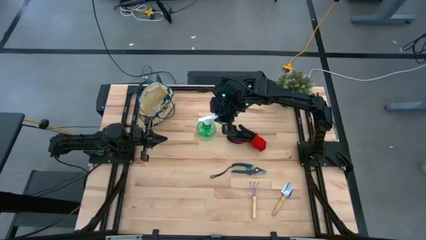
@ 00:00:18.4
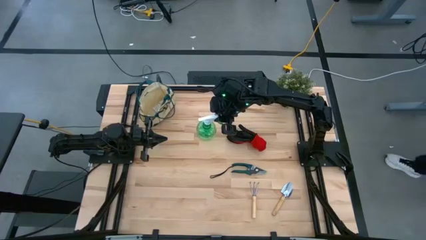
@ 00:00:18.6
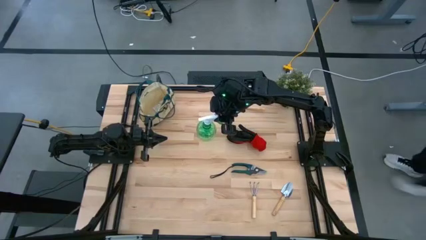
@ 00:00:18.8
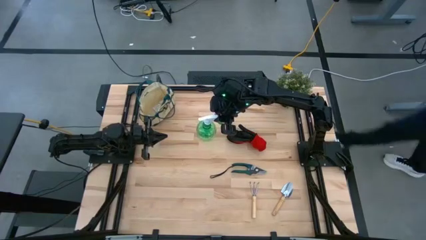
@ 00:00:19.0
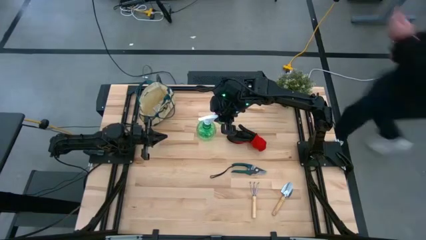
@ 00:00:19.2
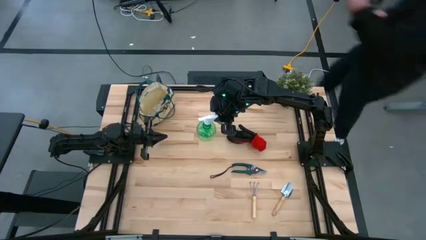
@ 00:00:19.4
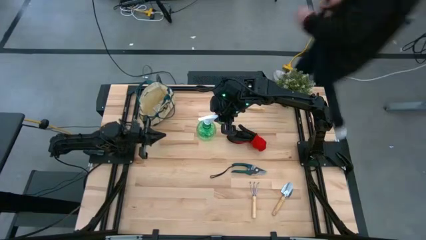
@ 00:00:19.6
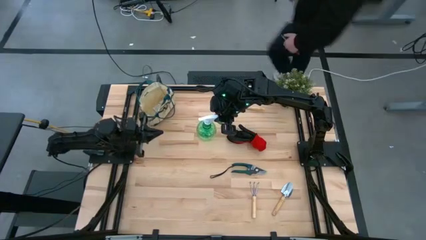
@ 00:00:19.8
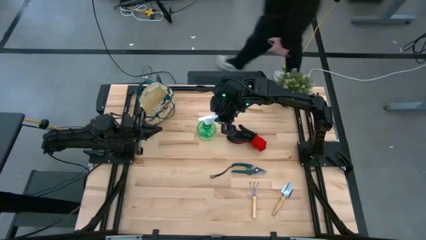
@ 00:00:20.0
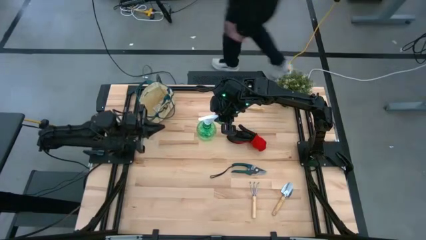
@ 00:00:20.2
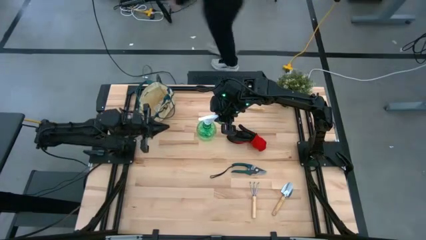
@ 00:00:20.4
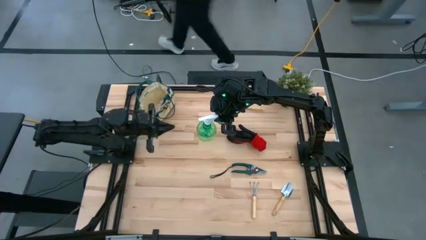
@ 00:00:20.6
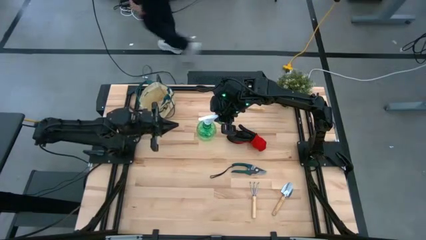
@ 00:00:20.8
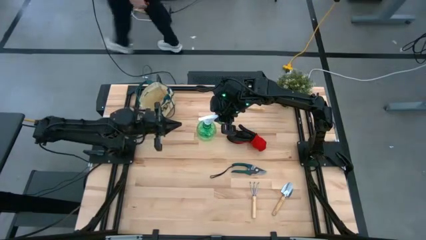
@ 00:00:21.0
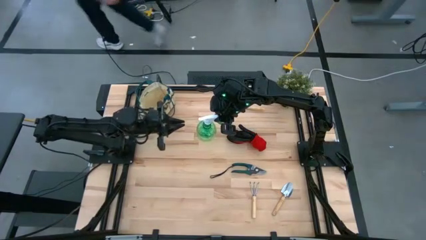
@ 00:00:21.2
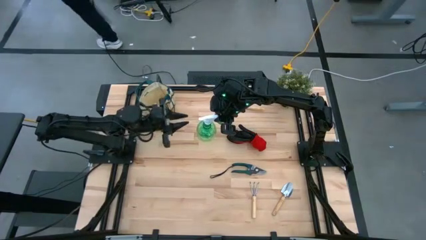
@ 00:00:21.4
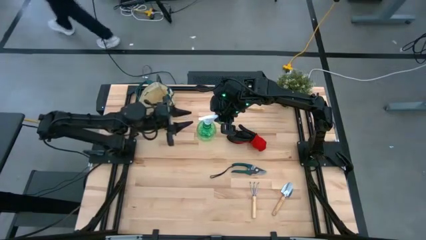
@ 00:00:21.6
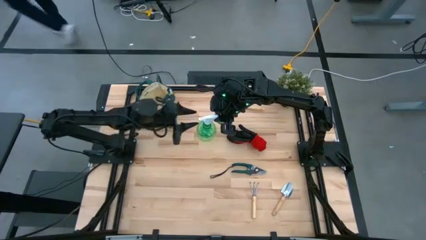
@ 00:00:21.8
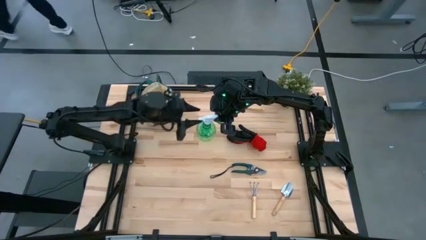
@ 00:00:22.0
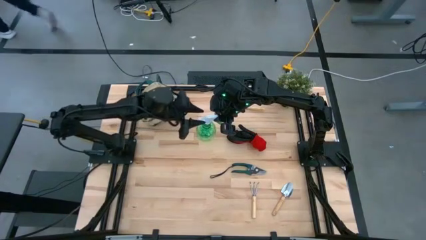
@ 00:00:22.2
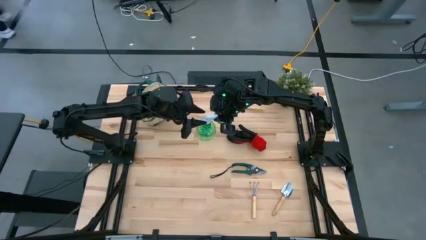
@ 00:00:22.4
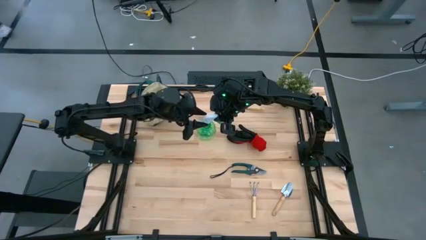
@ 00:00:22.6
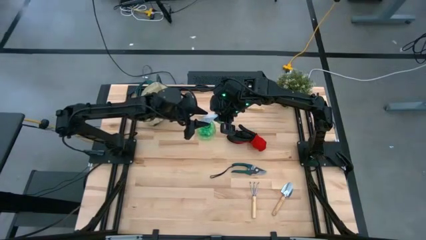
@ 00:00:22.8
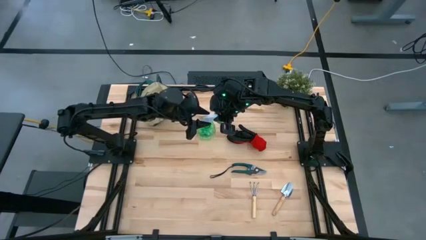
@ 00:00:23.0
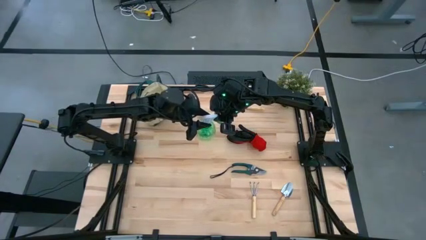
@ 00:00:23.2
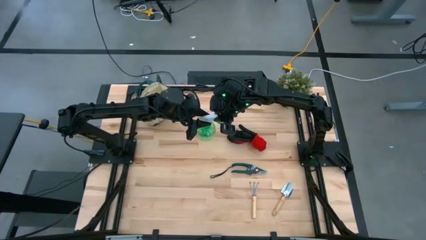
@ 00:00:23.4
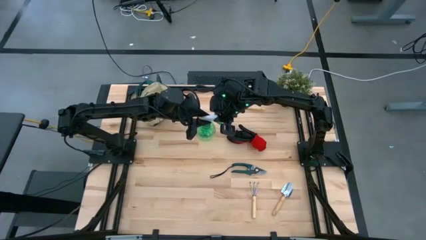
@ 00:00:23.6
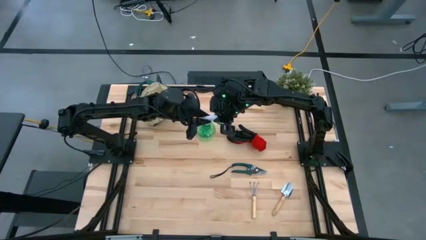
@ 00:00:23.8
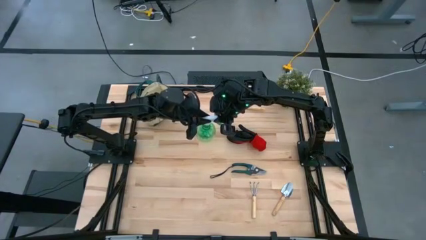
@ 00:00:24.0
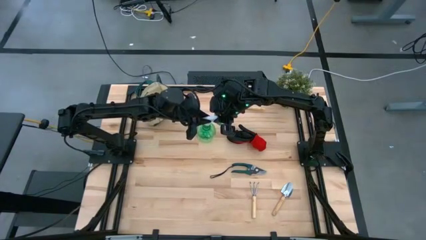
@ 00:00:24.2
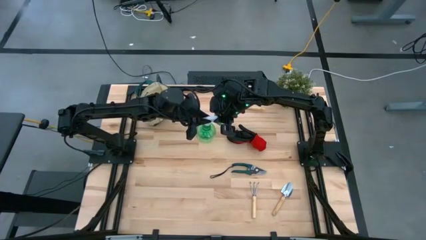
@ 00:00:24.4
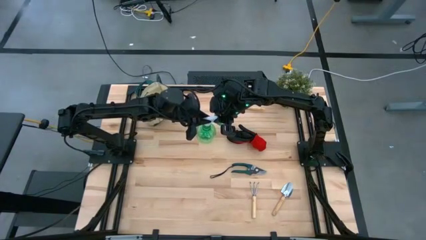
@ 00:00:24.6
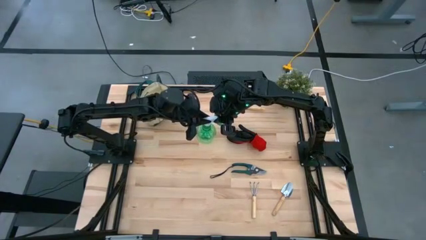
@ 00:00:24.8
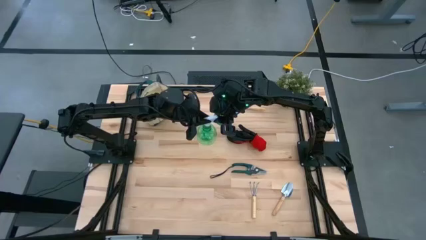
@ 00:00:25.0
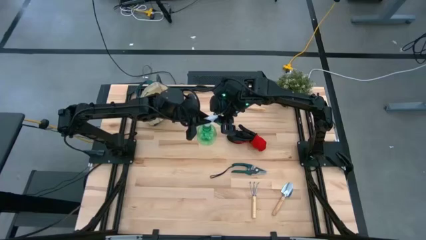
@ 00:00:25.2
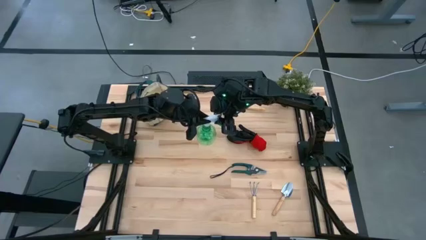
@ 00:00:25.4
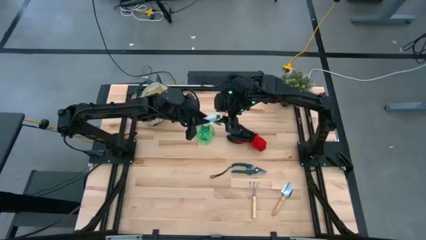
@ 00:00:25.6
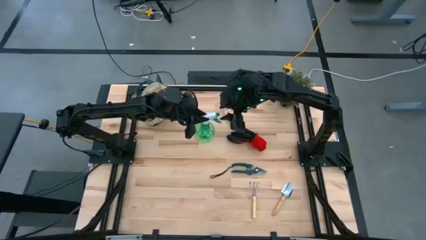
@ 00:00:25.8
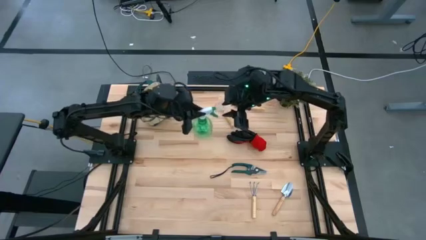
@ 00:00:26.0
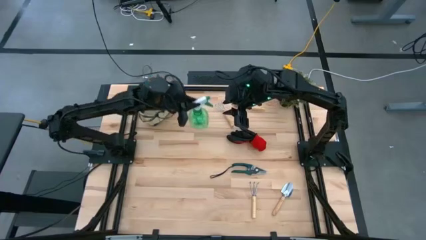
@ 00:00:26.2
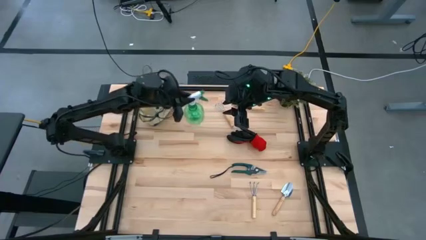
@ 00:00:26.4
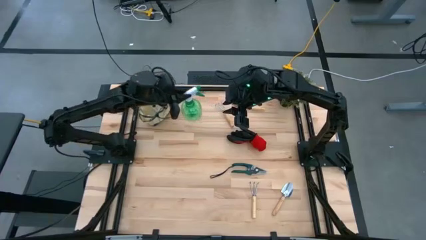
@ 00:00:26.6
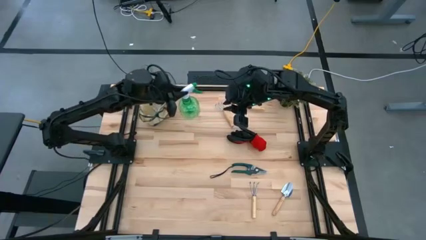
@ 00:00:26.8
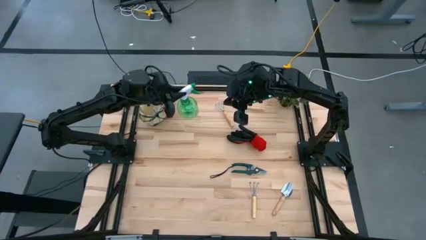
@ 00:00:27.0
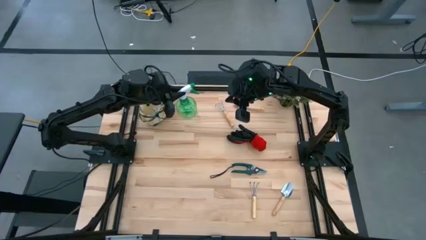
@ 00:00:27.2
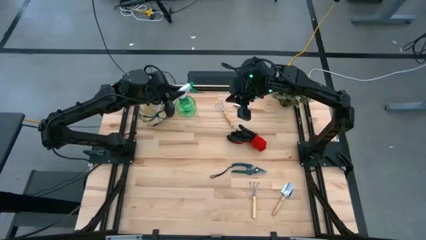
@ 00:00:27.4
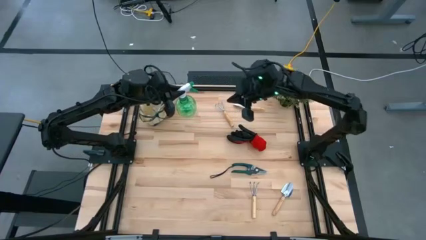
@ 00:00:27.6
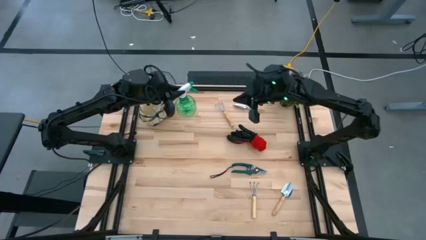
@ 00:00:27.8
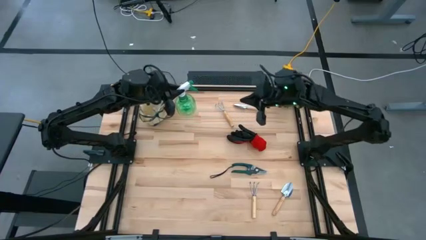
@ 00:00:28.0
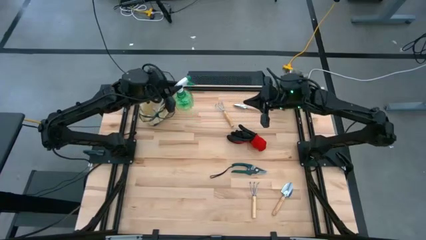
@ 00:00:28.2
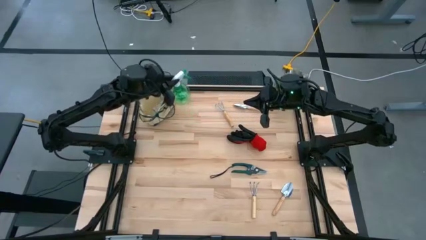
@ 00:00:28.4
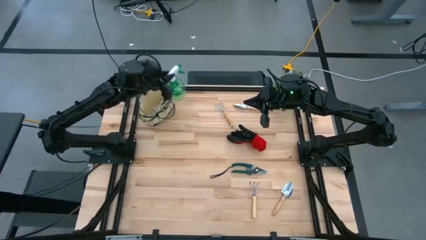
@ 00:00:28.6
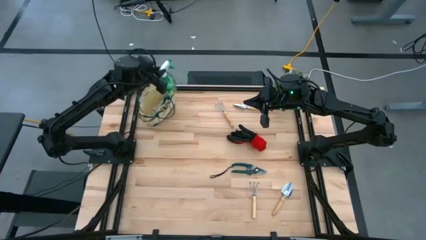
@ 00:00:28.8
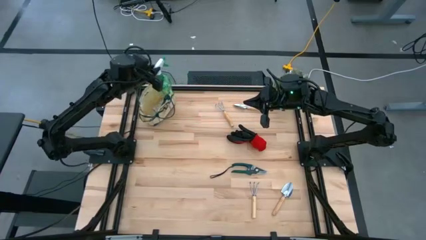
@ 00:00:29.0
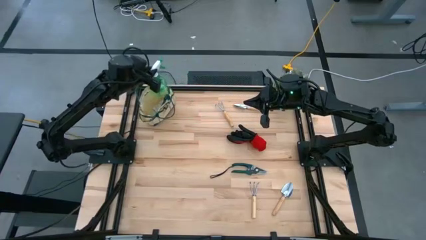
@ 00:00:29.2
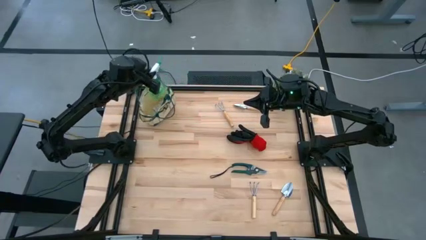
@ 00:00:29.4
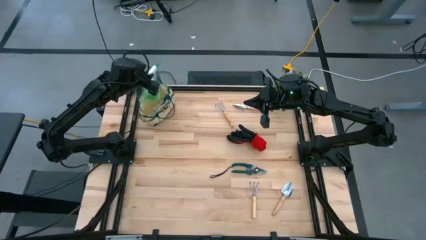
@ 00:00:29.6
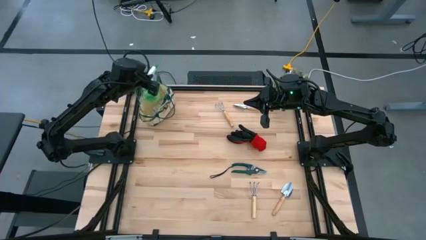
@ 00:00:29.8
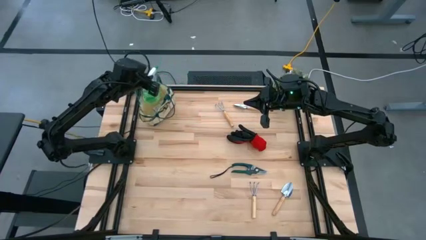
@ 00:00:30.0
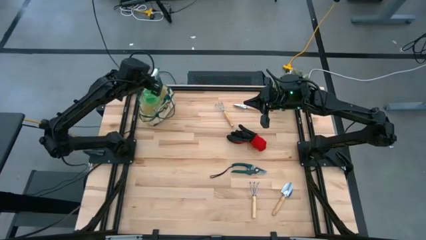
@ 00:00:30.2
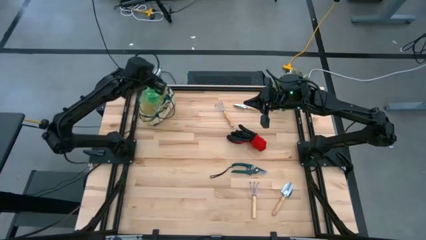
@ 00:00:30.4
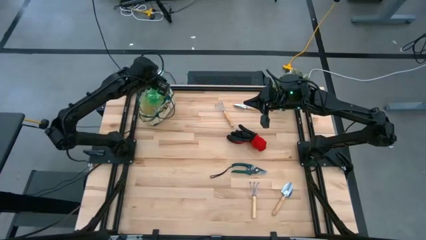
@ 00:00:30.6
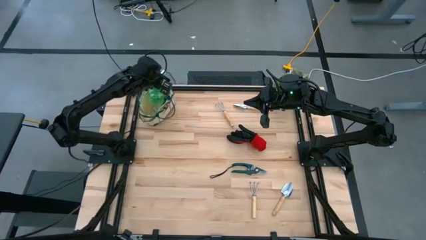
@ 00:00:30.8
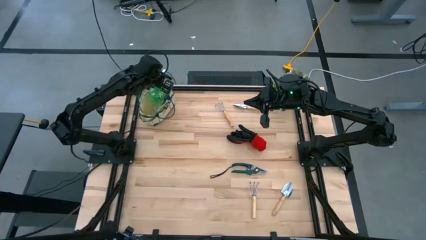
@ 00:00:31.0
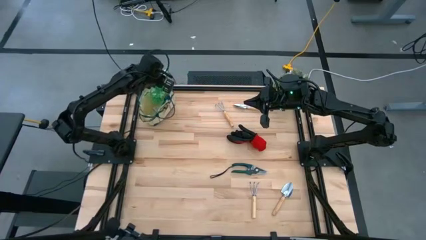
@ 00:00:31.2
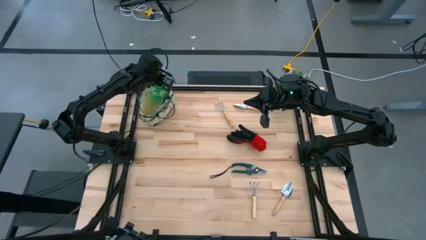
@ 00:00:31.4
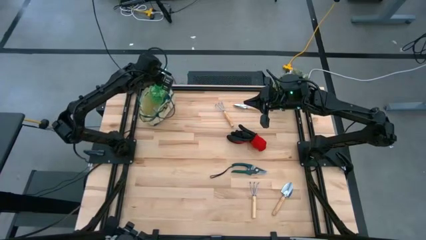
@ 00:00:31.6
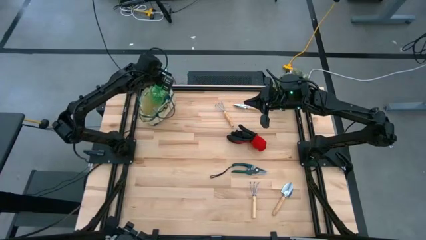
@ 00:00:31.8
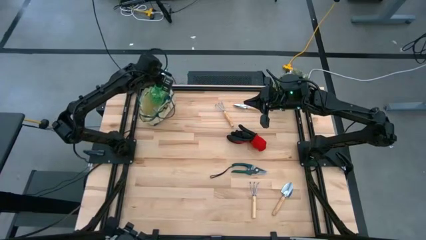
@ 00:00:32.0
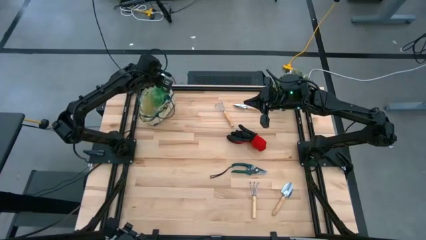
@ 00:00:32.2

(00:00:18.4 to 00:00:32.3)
Task: Pick & Place Garden tools in Gardening bag
Put the green spray bottle into the gardening bag
